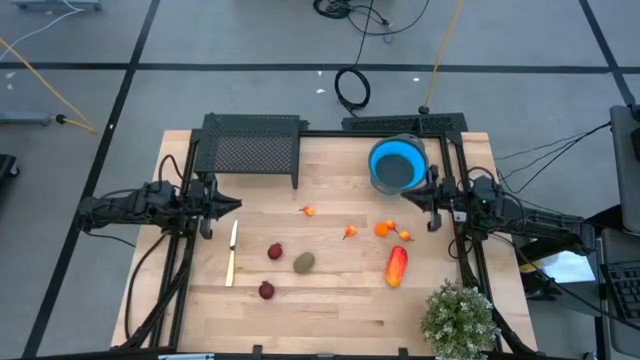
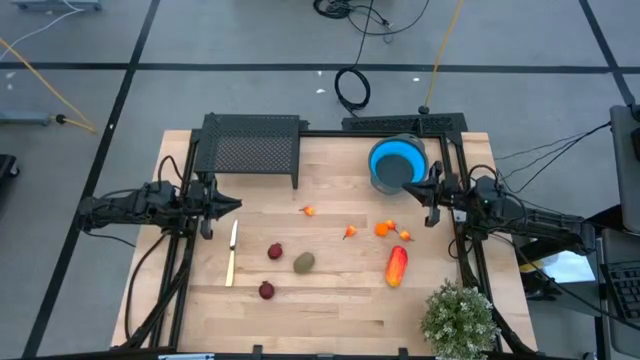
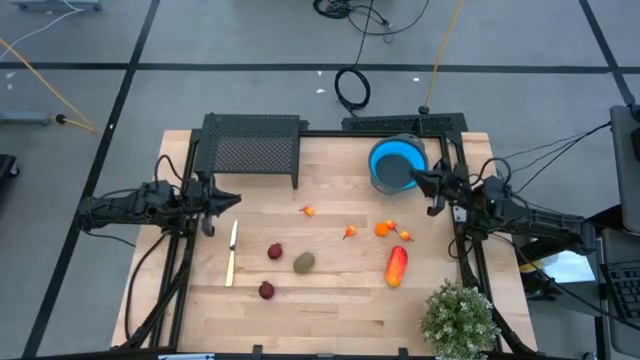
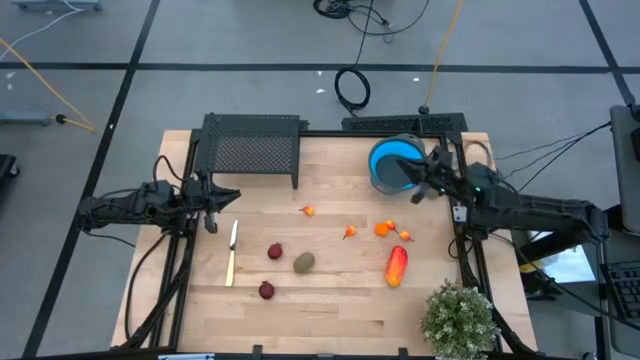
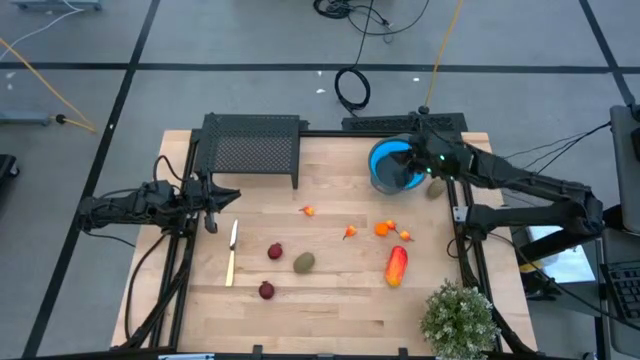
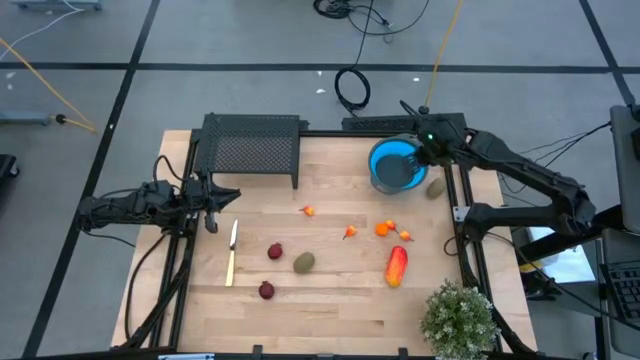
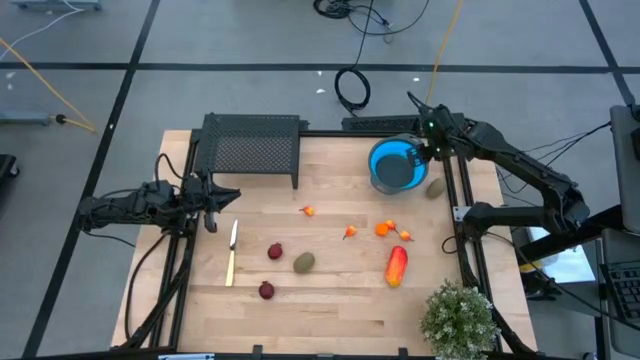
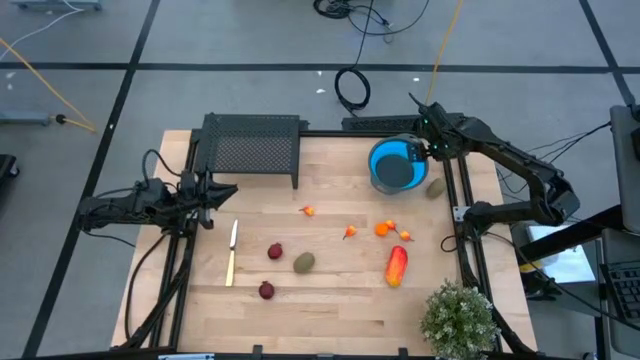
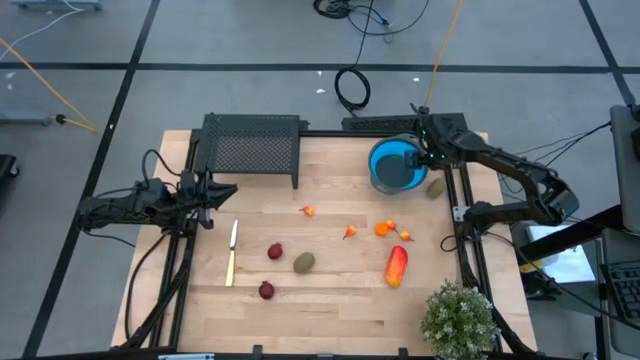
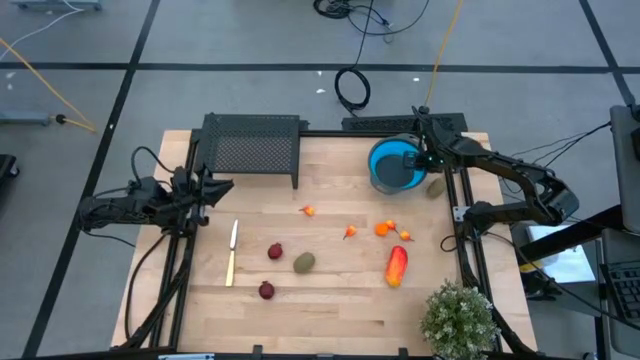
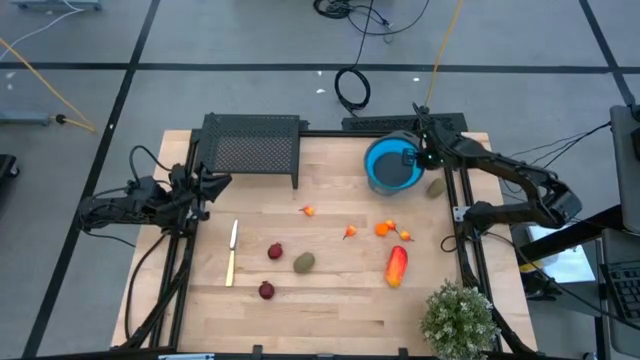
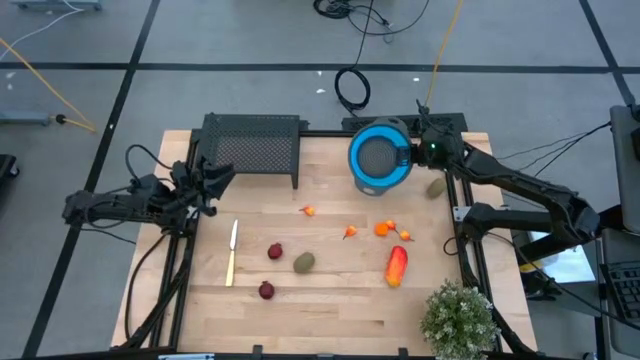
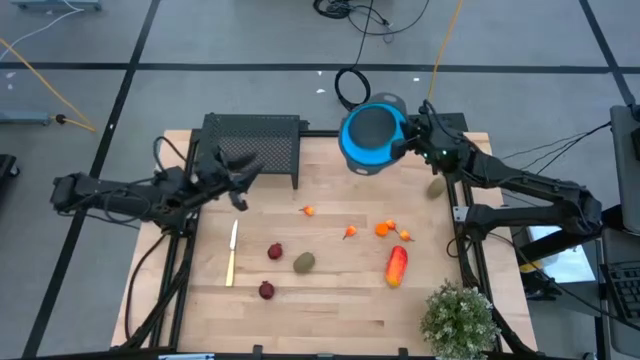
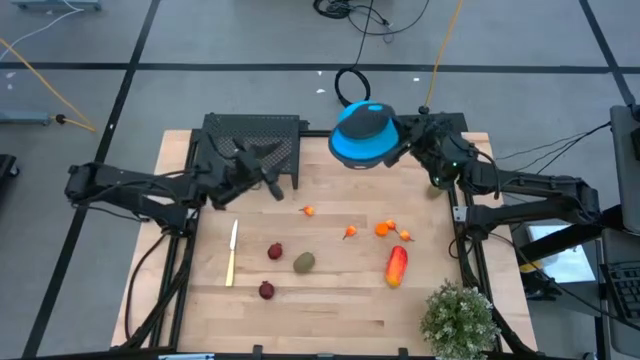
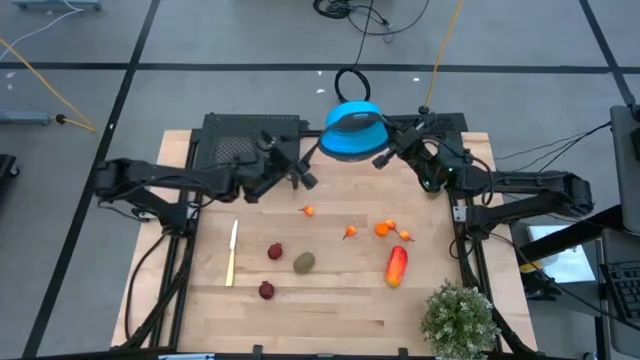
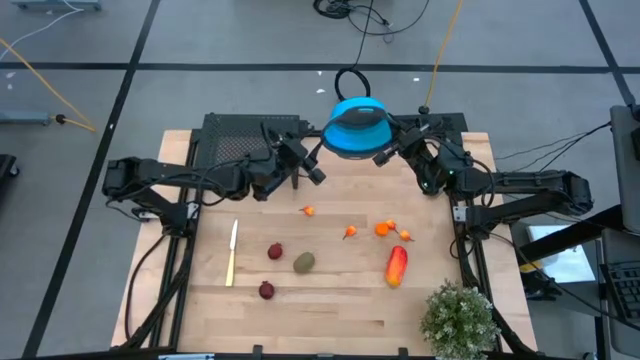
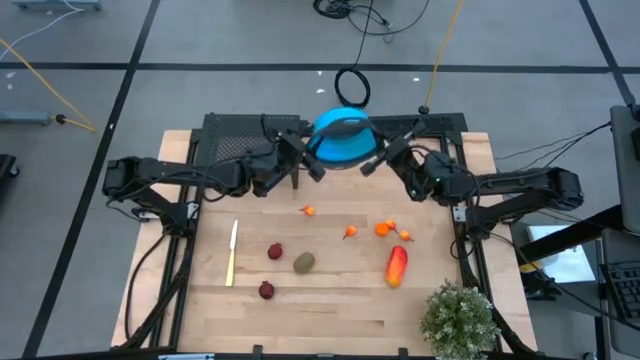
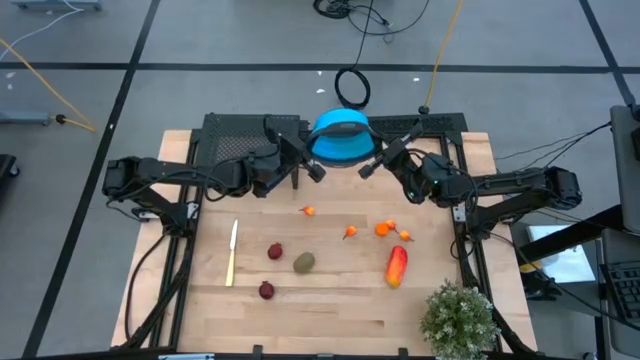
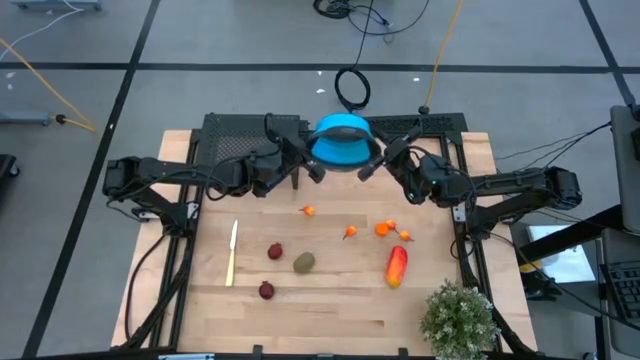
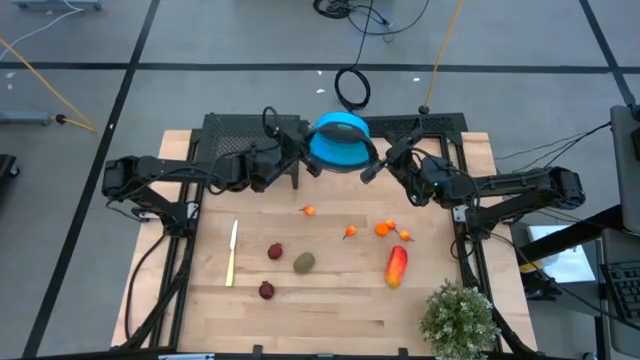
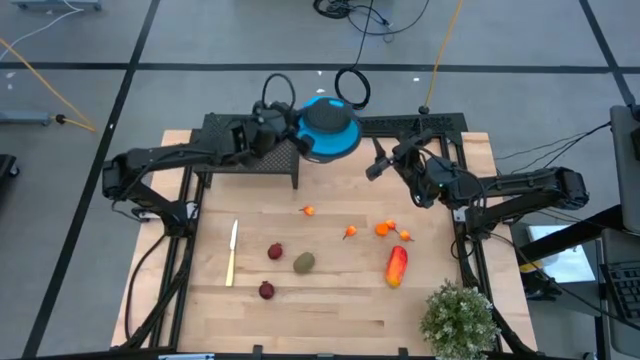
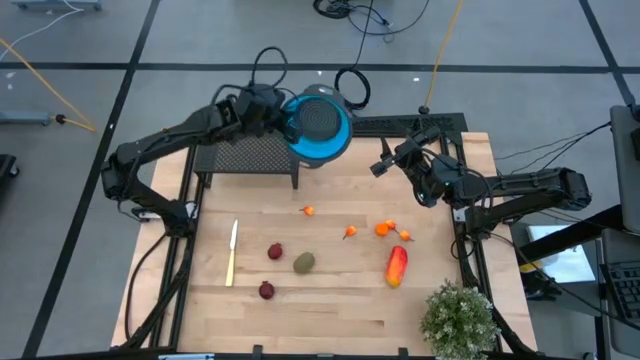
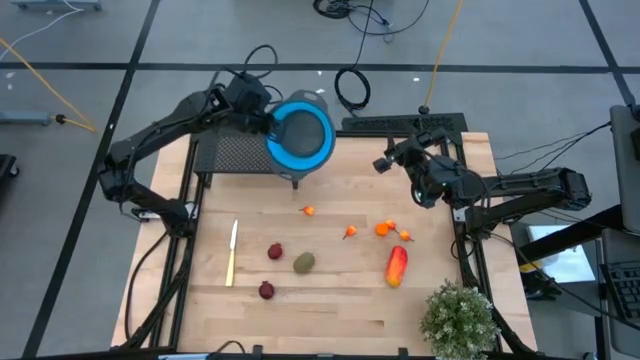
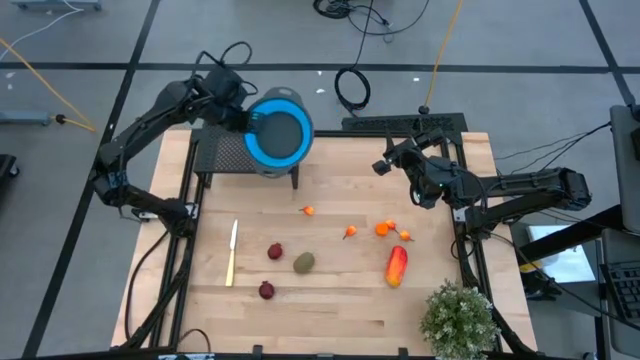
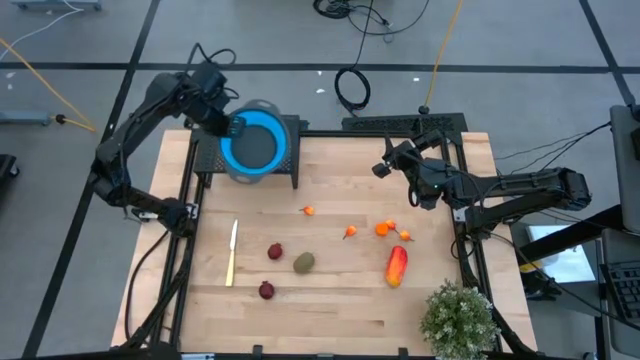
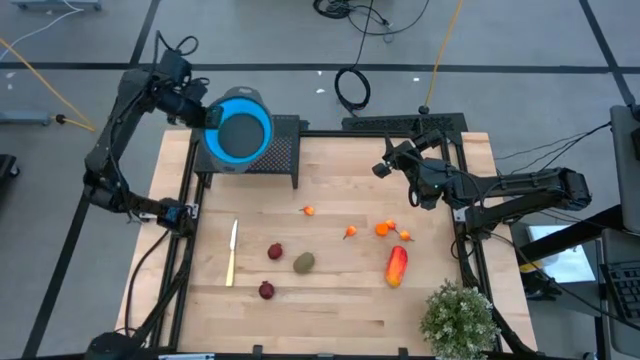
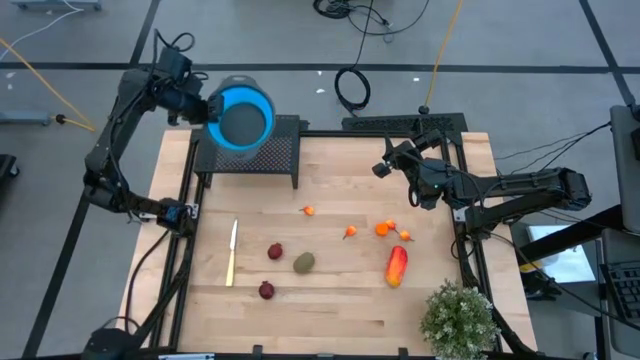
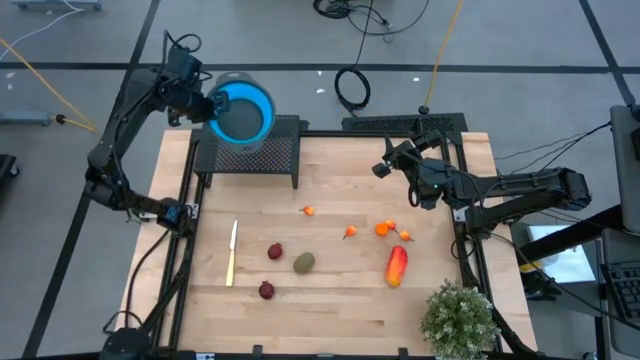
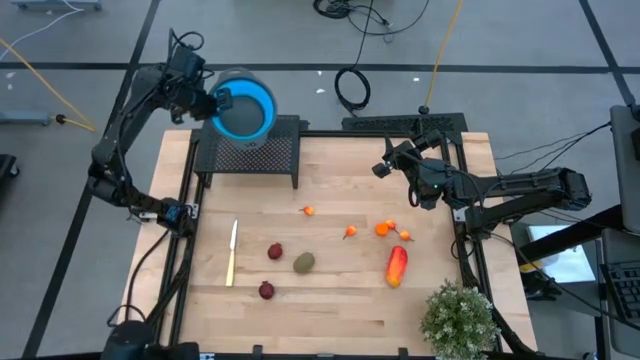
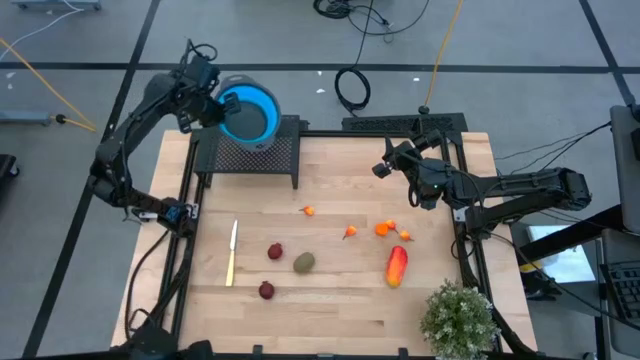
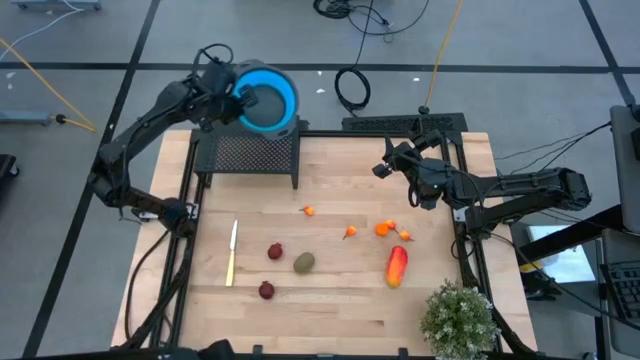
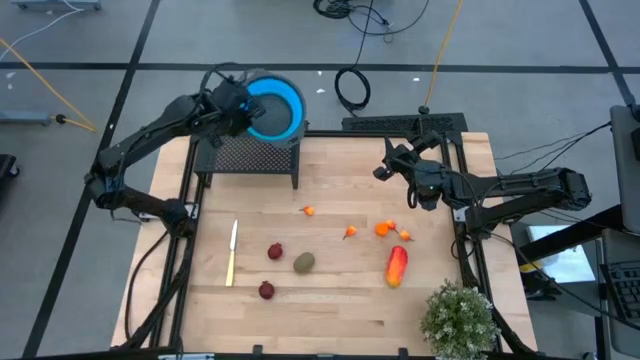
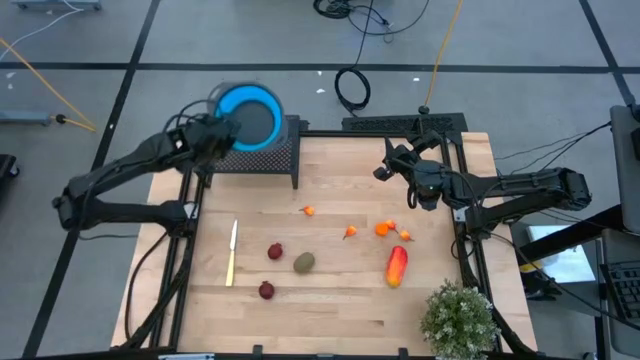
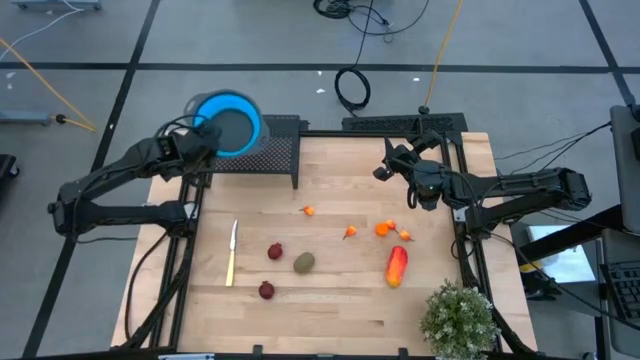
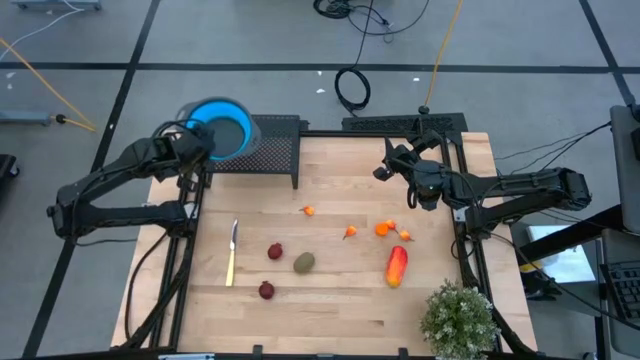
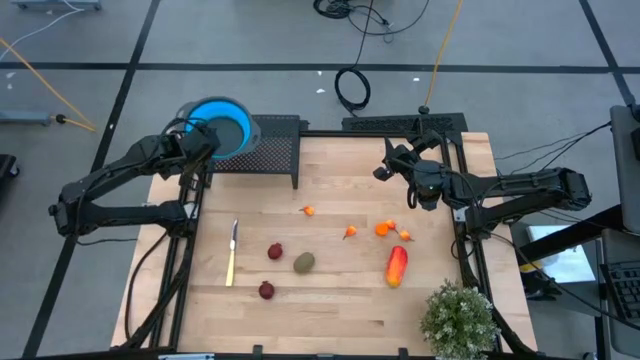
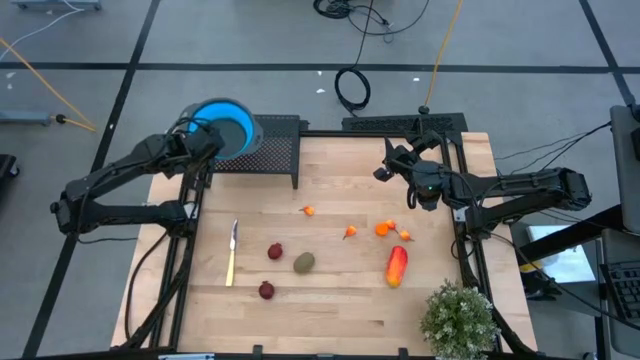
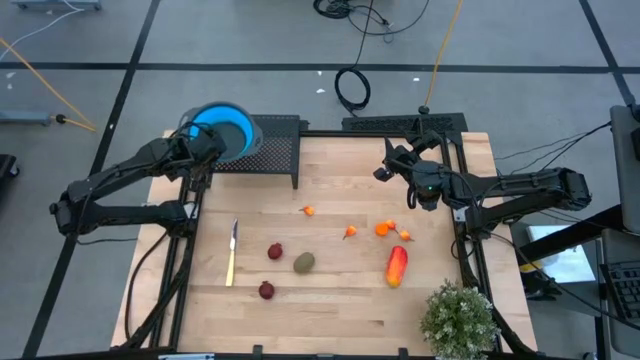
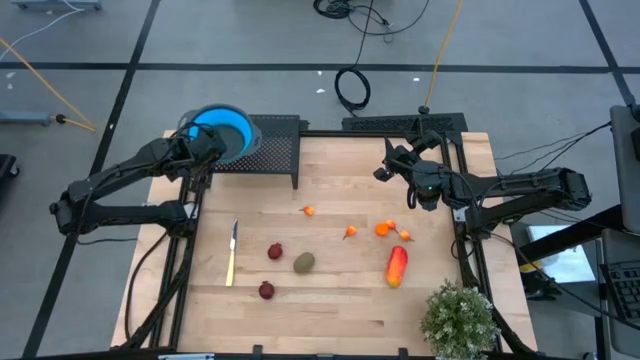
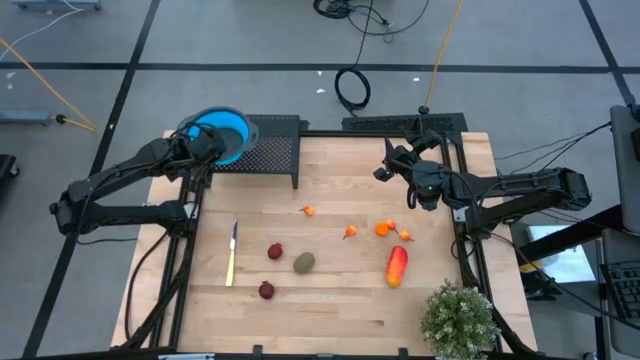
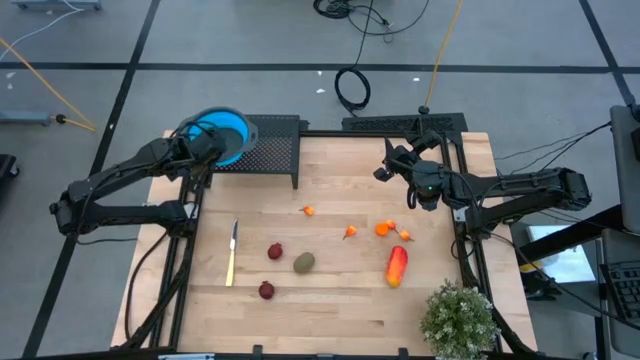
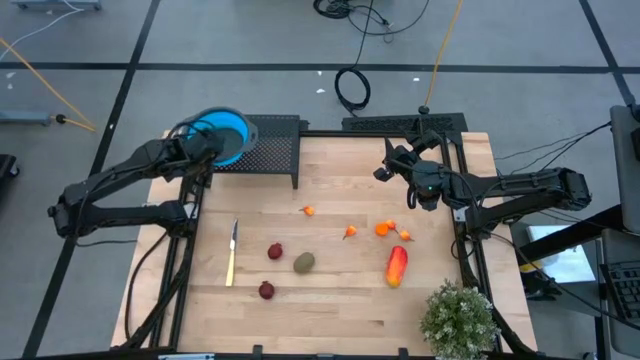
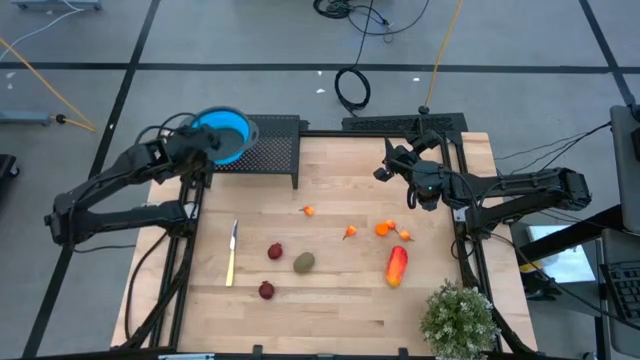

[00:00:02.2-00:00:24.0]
Task: Pick & Place Fruit
Put the blue strainer bowl on the shelf
